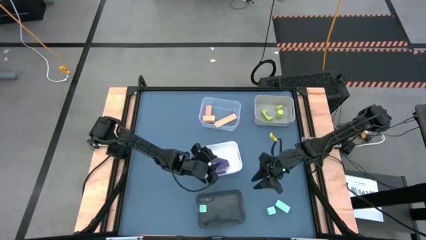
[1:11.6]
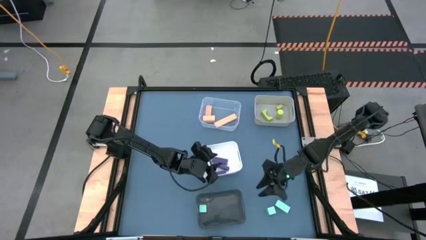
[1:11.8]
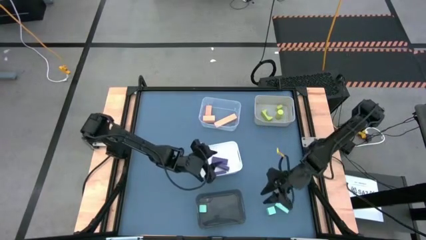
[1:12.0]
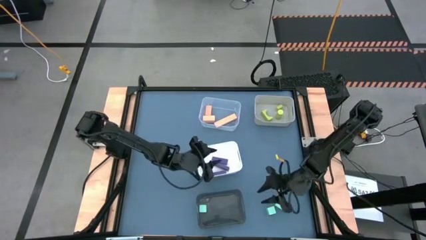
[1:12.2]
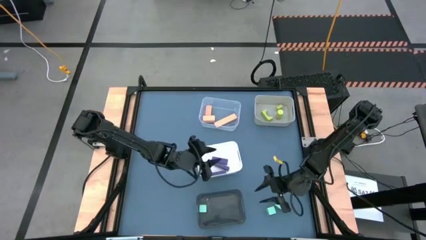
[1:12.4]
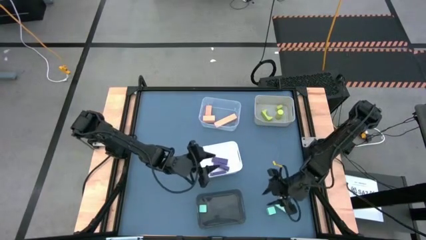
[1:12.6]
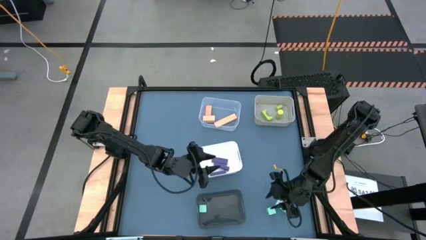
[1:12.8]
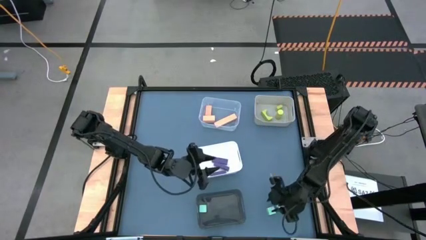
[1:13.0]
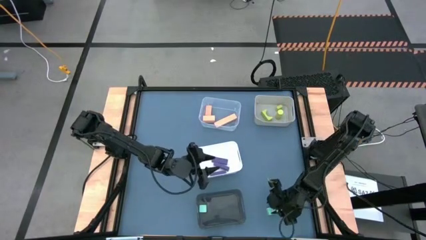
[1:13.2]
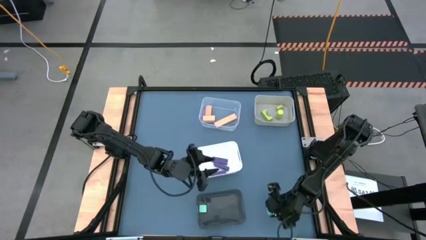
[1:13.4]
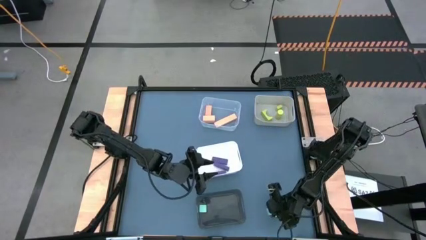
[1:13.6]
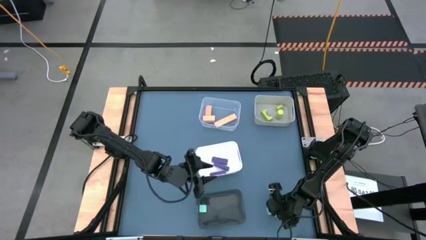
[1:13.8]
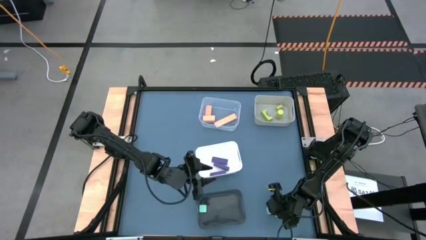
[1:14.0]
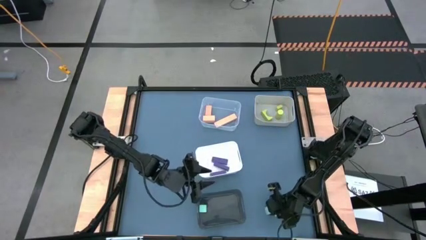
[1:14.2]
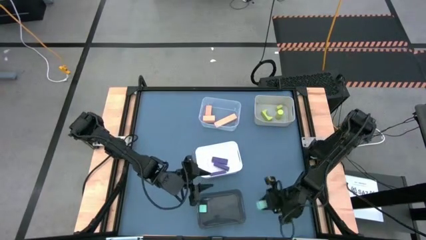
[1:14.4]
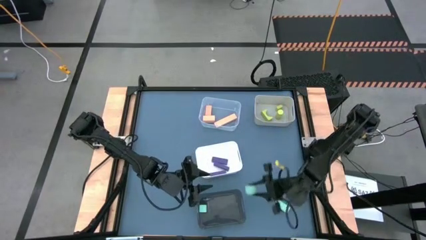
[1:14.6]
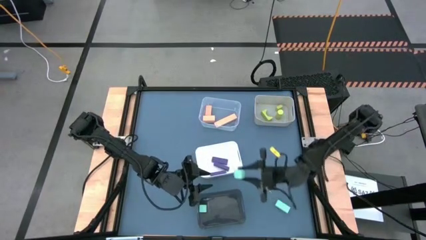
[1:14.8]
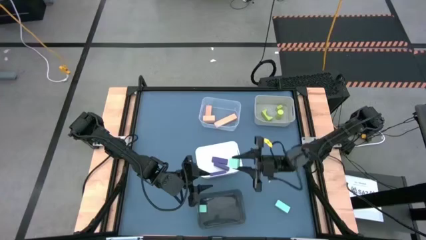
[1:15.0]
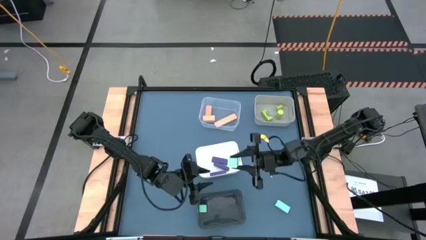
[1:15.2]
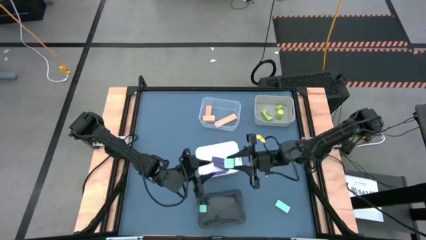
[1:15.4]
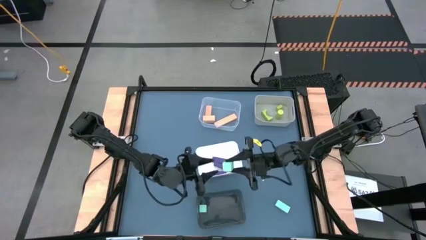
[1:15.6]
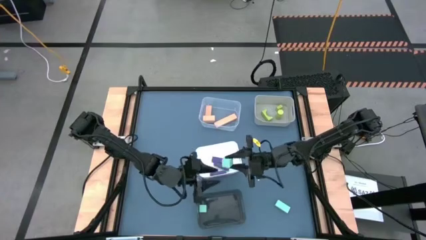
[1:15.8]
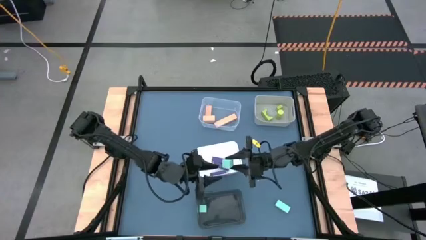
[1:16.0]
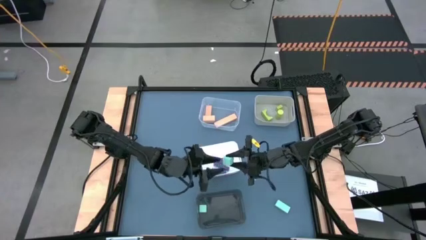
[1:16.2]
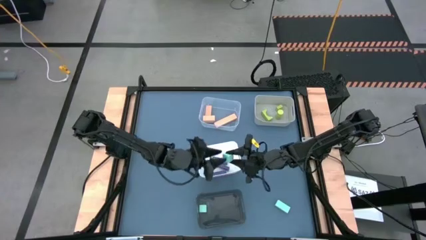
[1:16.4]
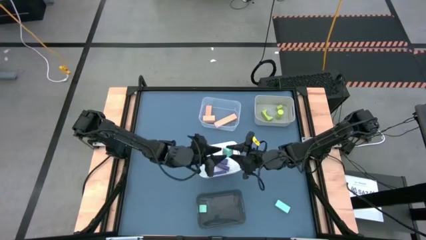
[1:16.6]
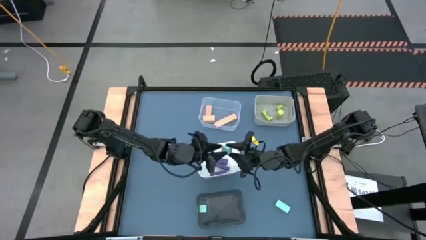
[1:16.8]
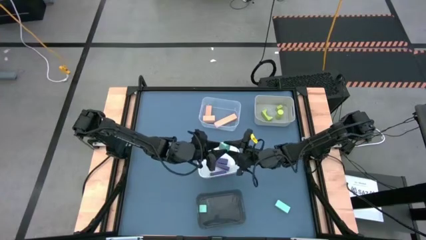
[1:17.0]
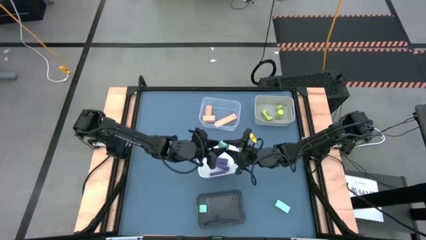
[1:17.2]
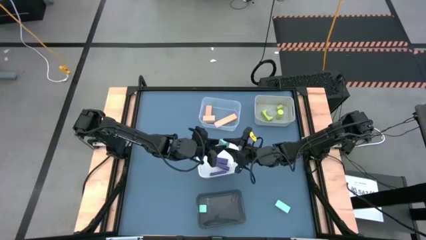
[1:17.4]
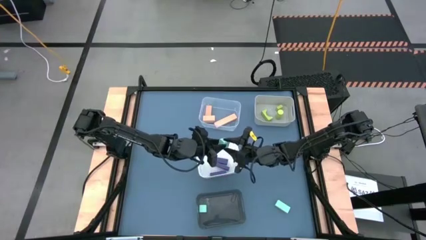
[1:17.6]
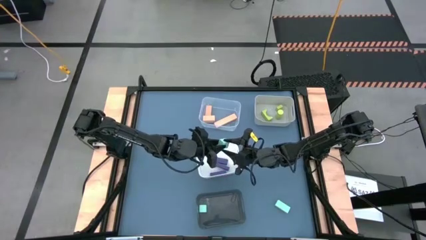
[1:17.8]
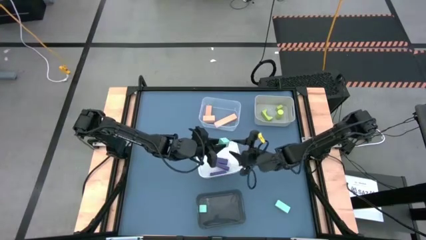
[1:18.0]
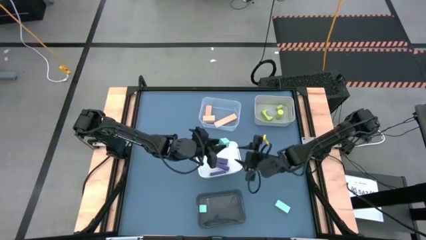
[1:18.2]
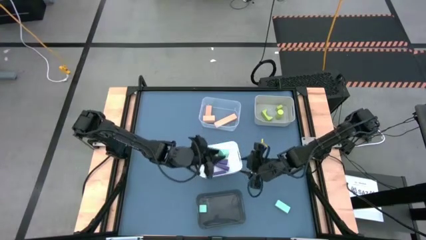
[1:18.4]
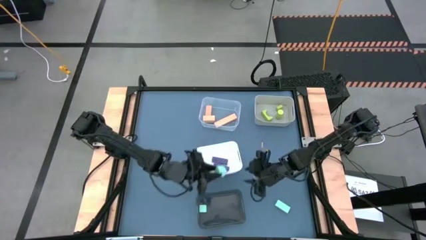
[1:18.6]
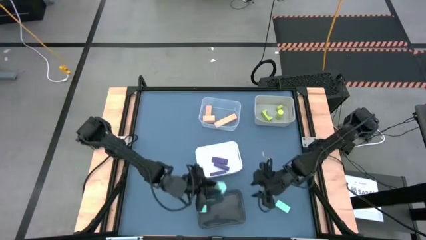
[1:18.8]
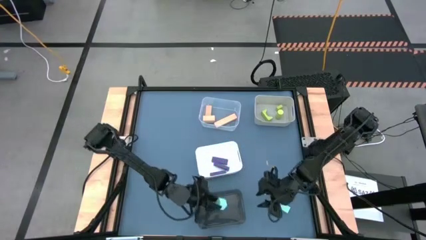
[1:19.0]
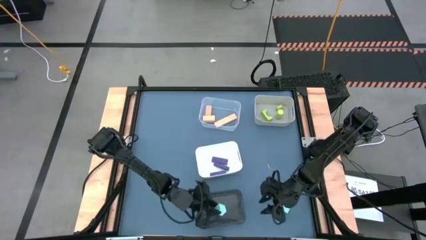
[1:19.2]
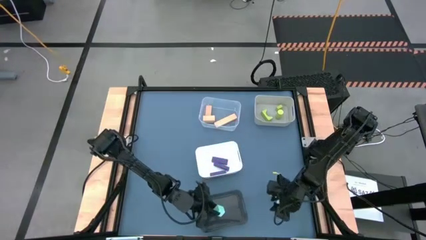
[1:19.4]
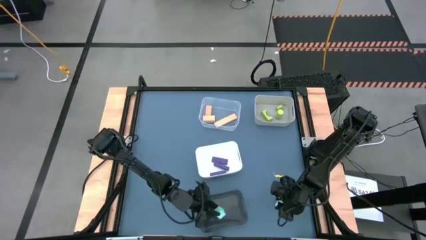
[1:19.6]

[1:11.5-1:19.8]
Task: Sort & place blocks by color
Put the light-blue square block into the transparent black bin

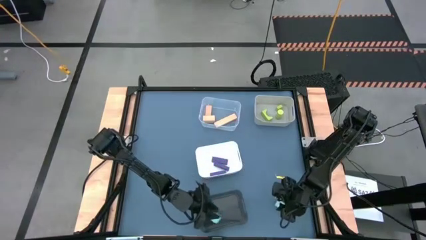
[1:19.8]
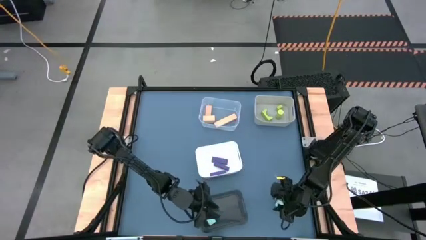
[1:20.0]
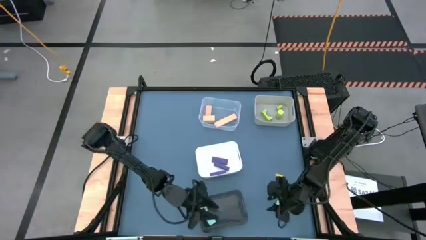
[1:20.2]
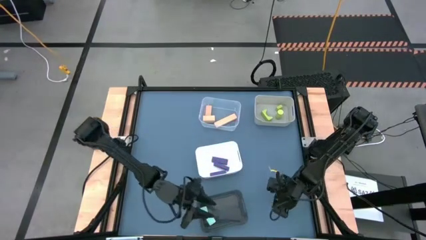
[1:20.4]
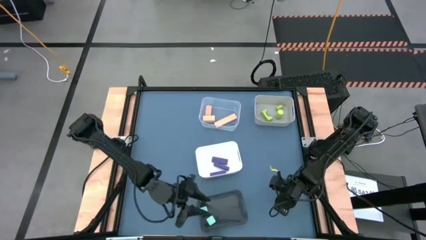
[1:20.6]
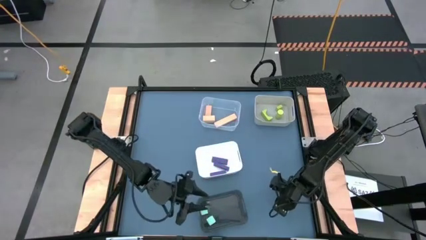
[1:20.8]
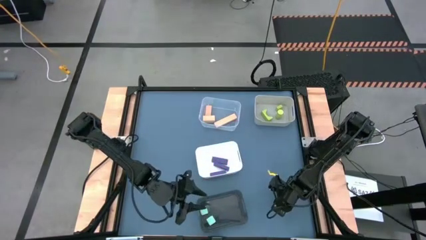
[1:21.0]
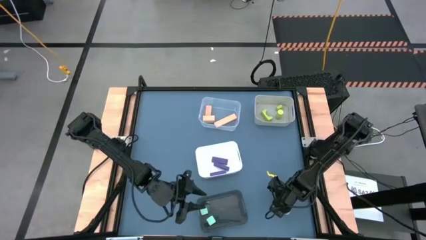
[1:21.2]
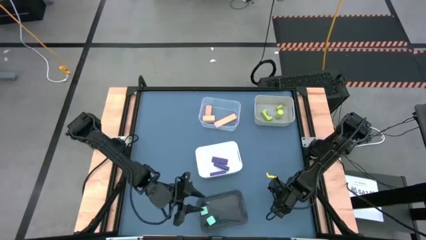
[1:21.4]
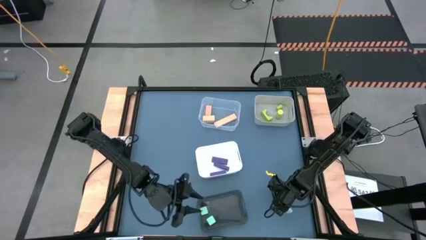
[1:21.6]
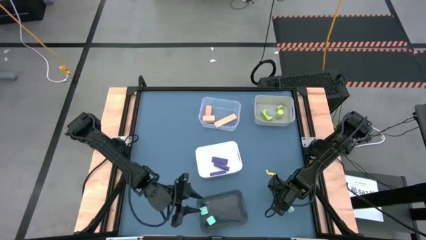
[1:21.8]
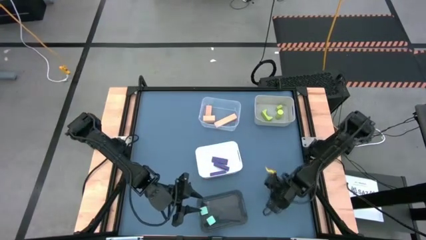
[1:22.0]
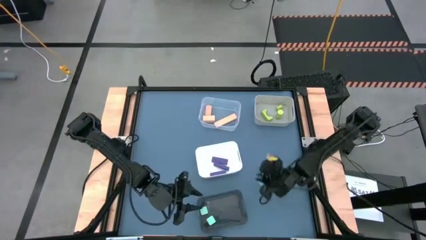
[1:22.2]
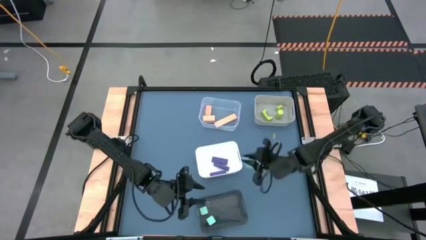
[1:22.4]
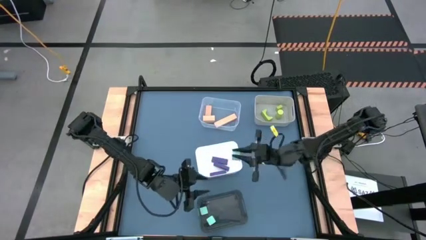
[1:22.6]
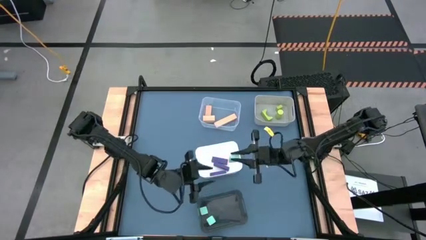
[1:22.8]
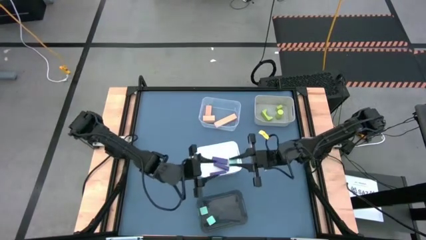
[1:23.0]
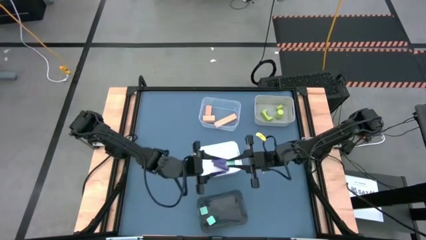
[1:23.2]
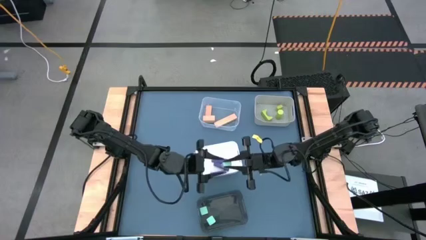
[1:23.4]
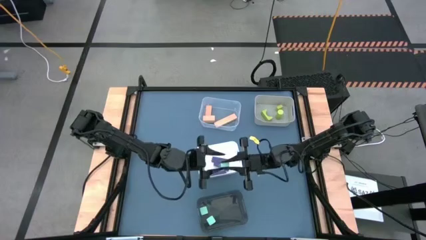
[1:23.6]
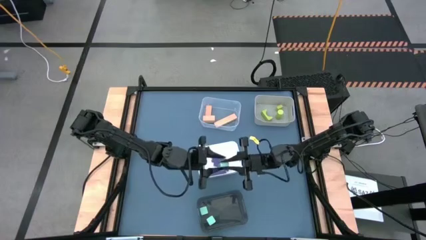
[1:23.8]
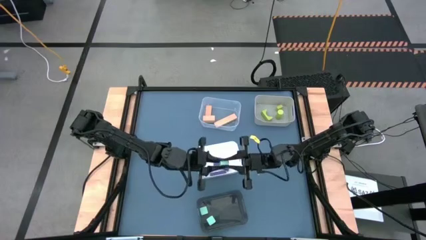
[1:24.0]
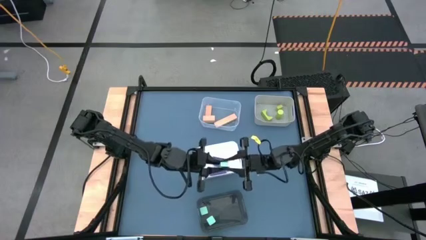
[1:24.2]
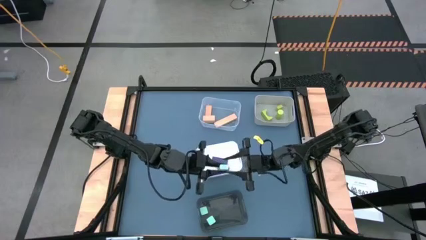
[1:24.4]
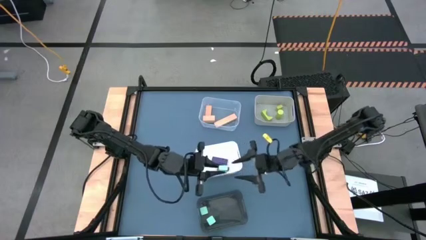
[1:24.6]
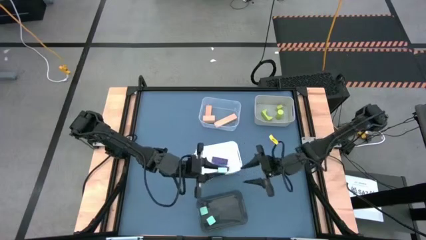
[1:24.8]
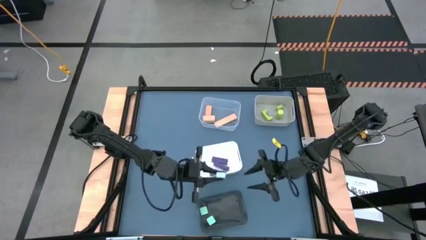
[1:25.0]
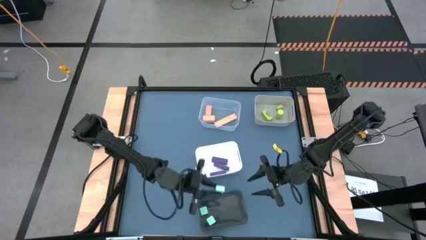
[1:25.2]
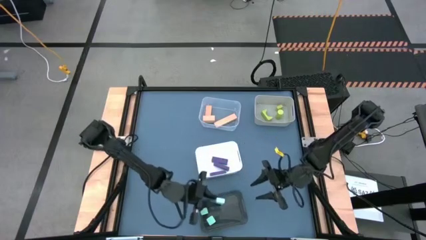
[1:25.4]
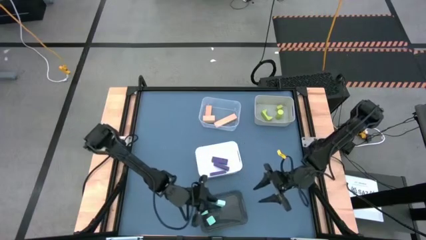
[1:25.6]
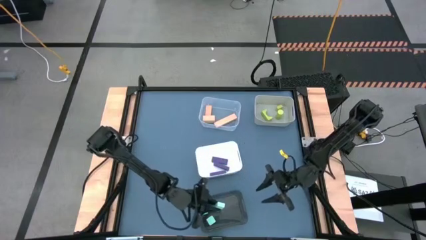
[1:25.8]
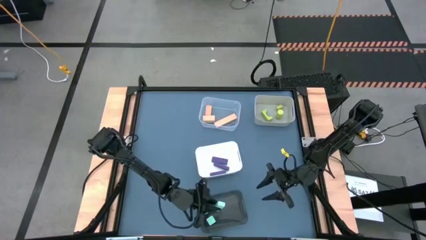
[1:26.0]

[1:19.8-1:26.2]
Put the light-blue rectangle block into the transparent black bin

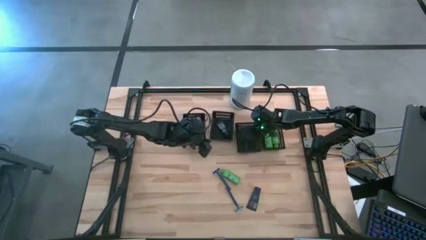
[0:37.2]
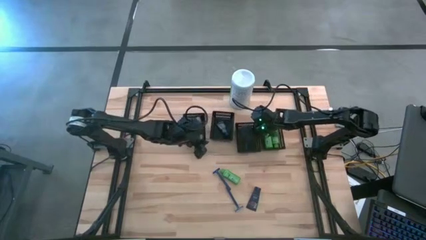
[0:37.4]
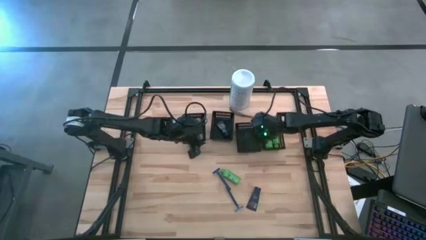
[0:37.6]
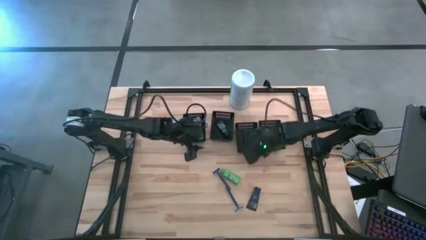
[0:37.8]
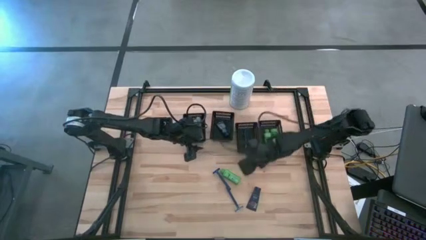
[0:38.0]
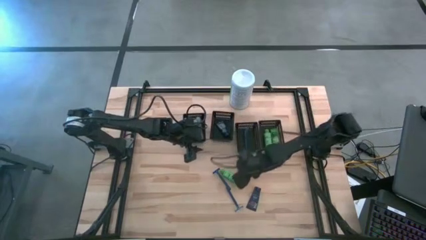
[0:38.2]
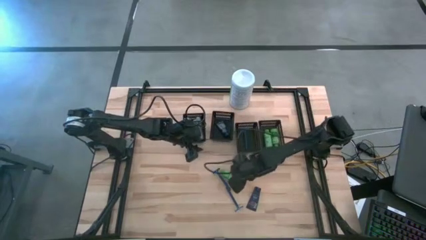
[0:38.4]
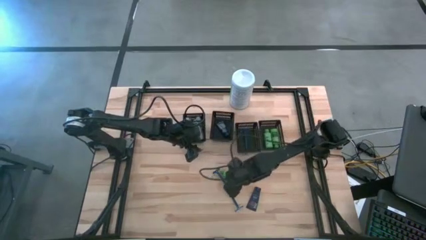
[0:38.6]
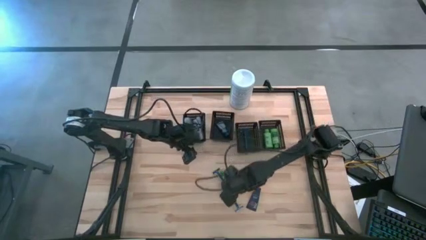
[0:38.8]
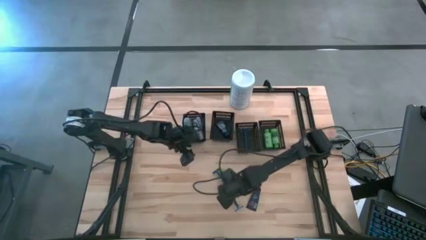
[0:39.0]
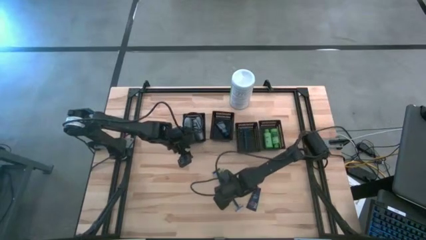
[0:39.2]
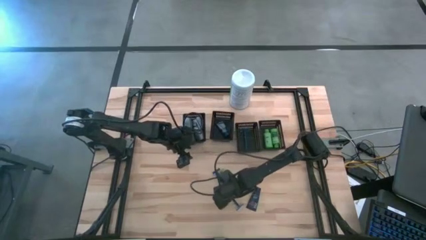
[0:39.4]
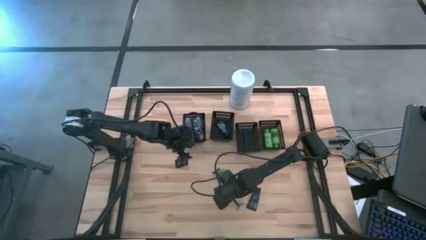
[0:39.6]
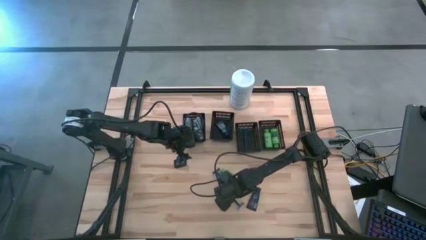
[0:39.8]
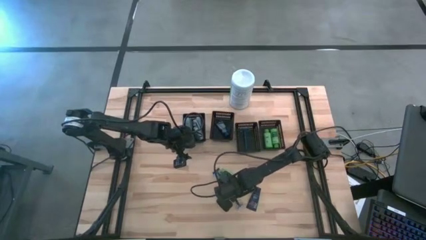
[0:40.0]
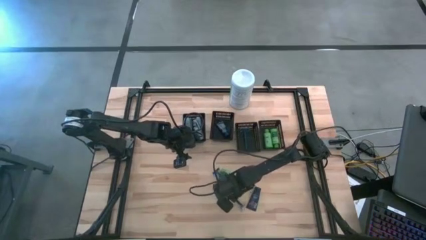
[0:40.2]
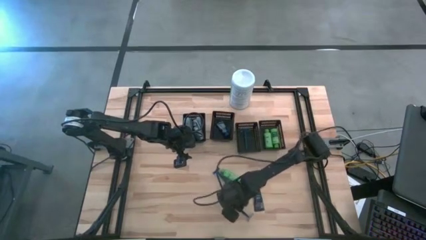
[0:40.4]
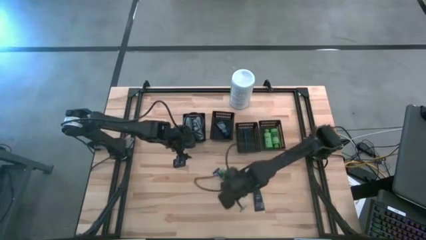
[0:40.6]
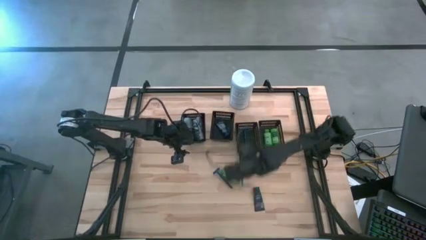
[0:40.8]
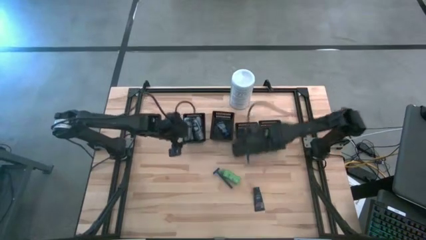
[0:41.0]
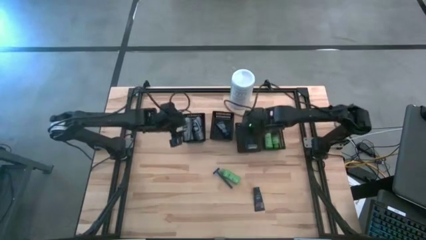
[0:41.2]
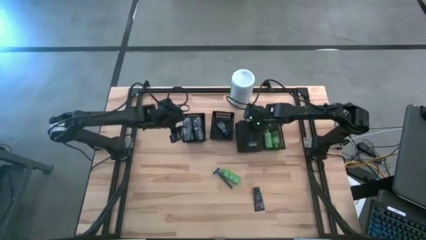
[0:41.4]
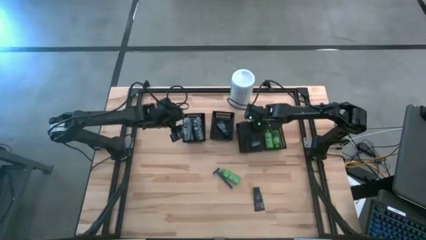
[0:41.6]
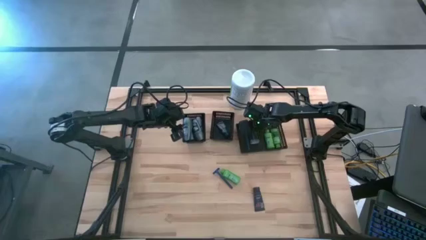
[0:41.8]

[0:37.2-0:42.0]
Task: Pick & Place Travel size toiletries
Put the blue razor into the middle right black bin
